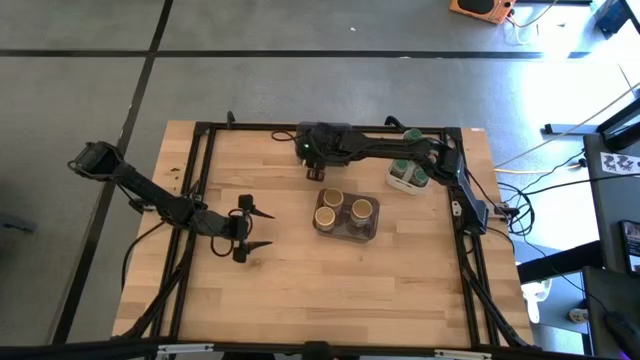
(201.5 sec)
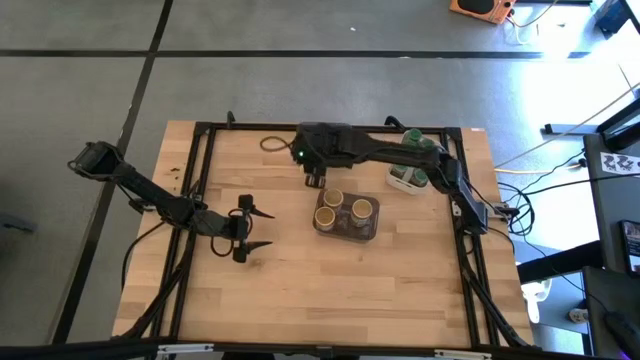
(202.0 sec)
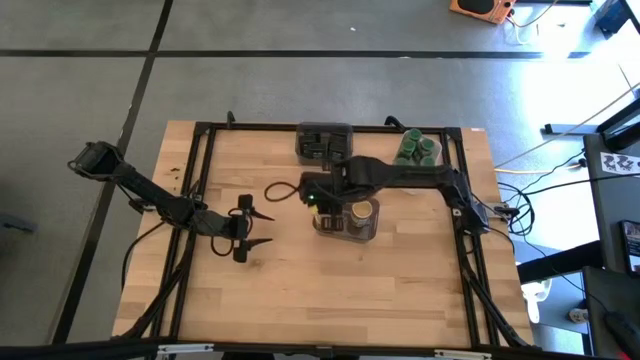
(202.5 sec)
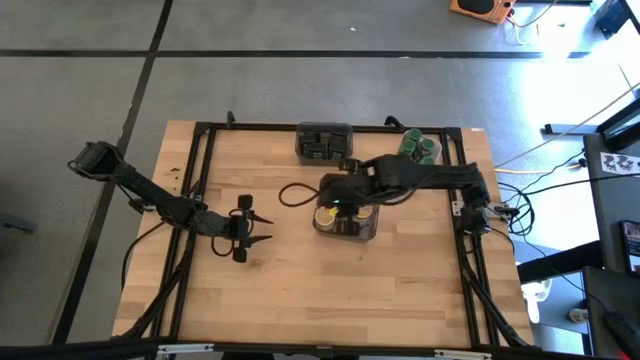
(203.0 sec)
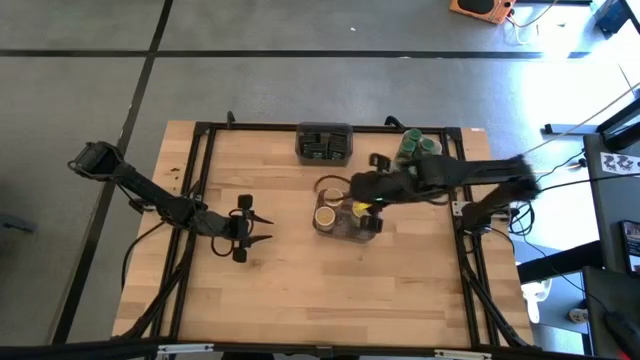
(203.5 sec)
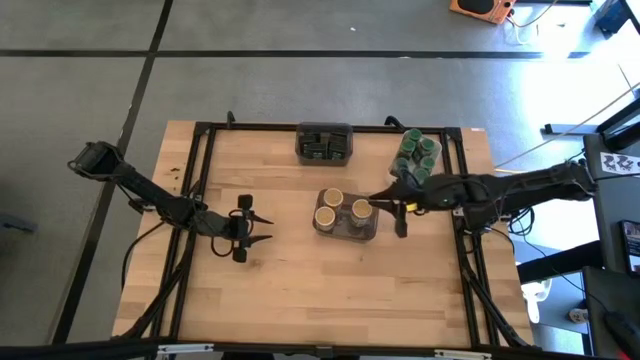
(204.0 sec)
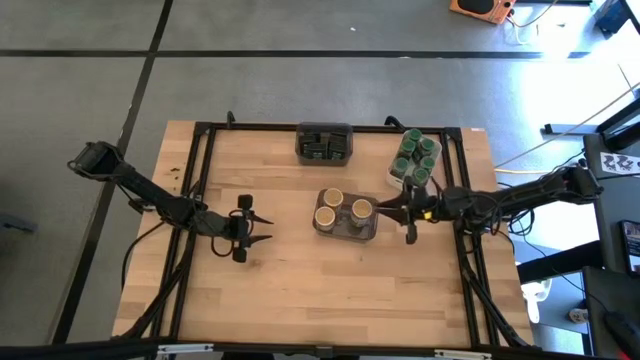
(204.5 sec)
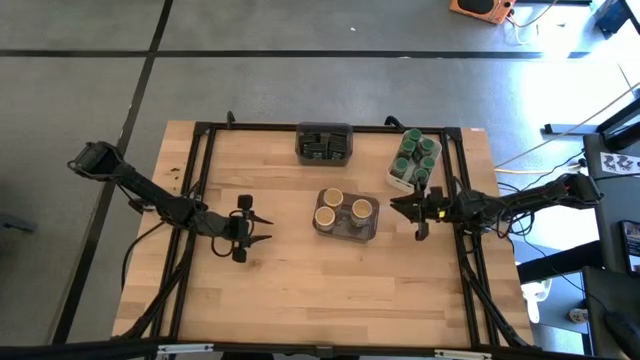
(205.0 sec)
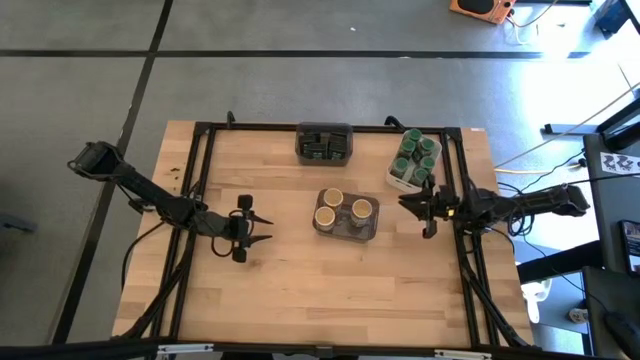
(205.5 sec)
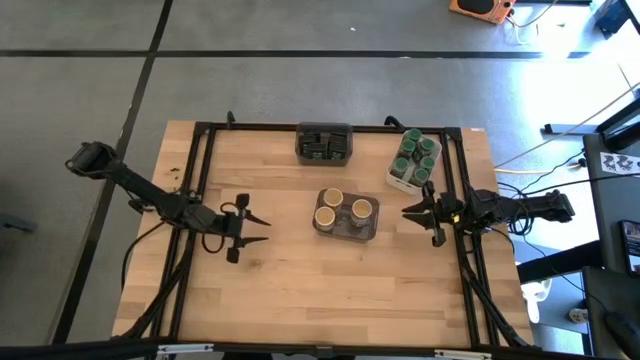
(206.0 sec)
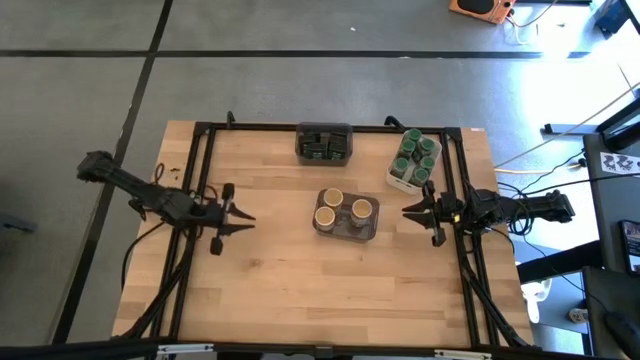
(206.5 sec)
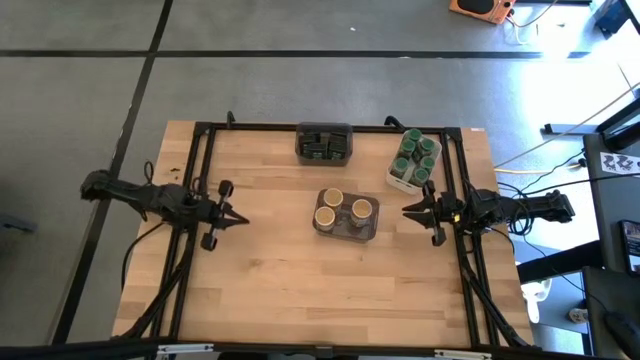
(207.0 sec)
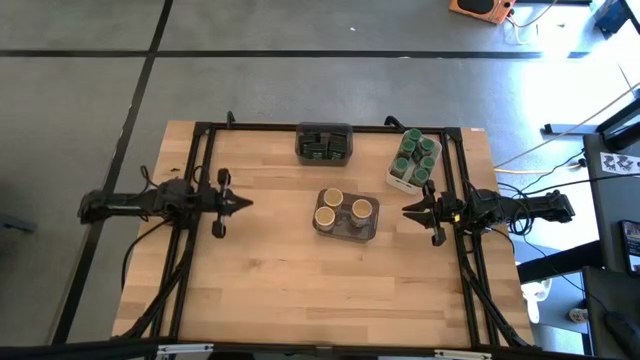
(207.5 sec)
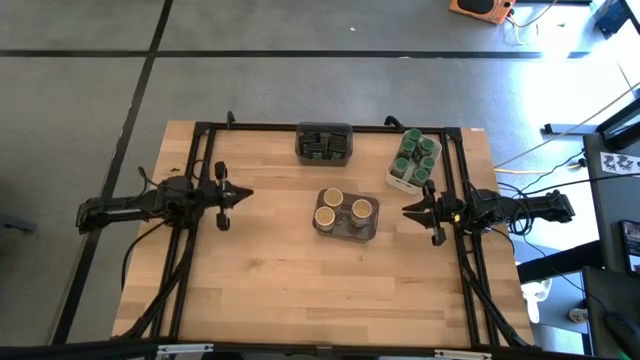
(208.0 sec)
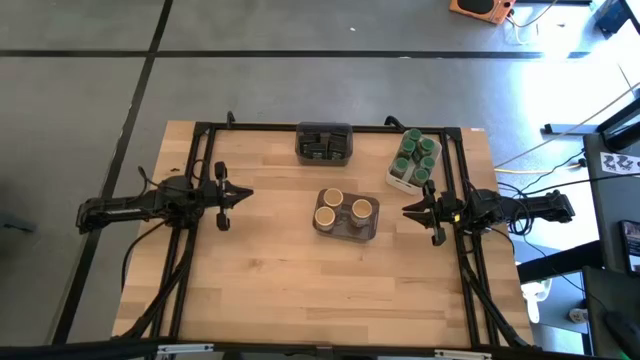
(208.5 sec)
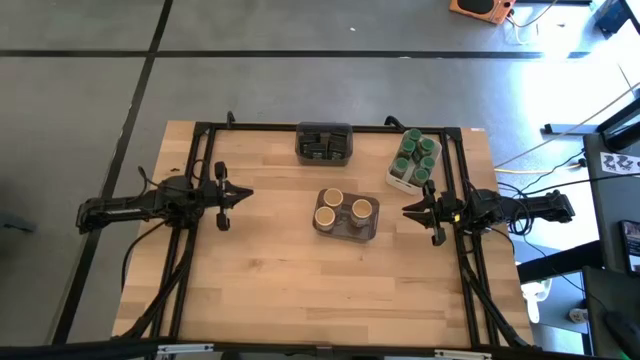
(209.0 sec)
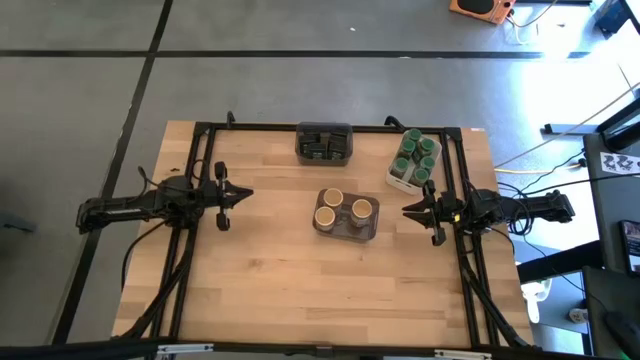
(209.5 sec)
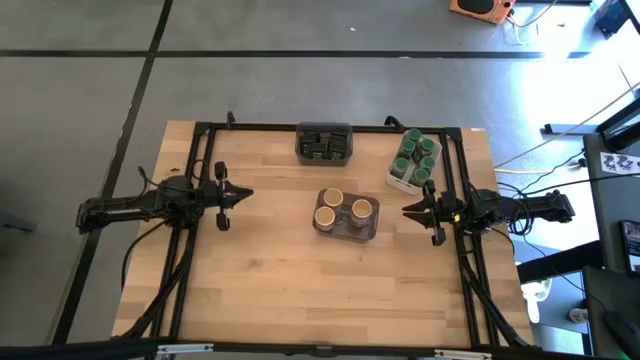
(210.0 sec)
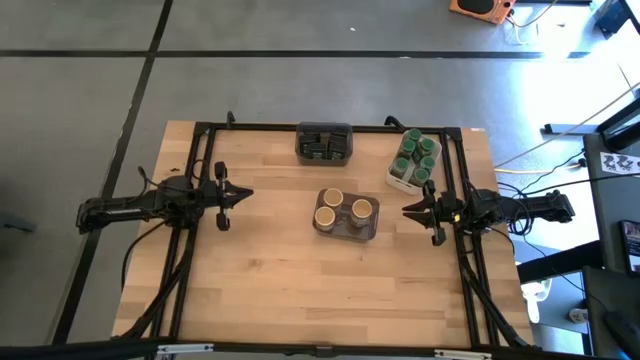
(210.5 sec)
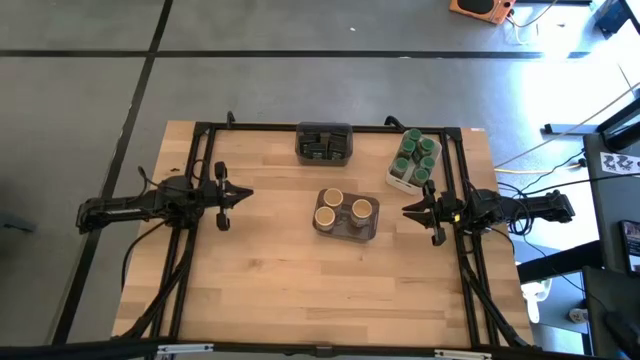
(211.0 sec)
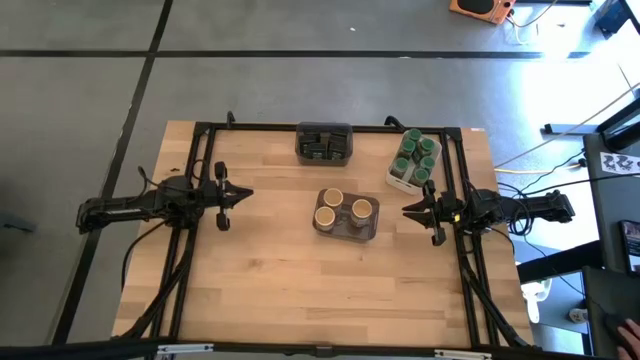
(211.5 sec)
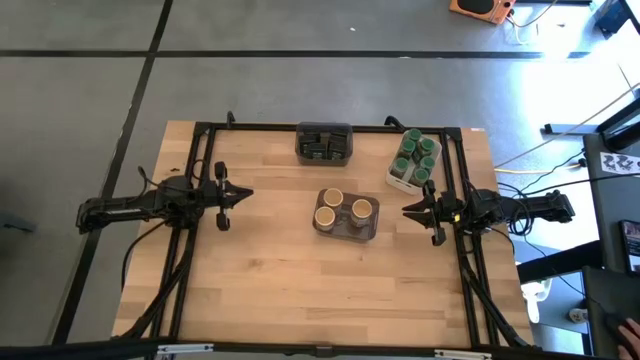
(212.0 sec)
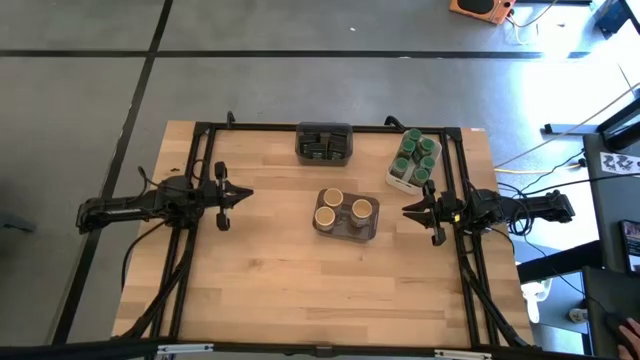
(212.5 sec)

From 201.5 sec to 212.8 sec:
Task: Sort spices by type
Return to Home Position

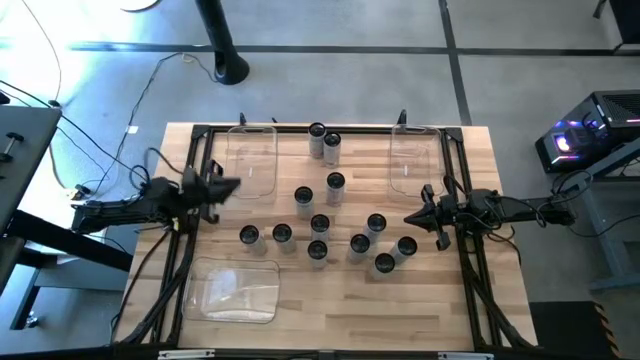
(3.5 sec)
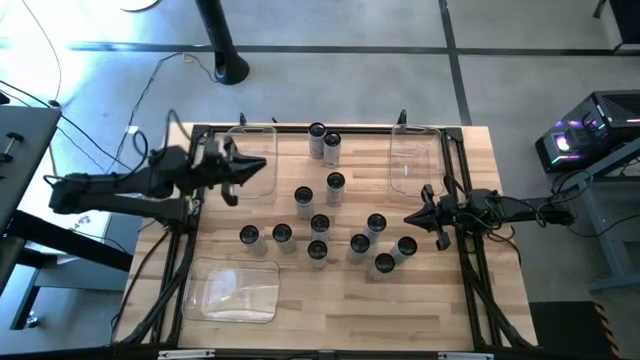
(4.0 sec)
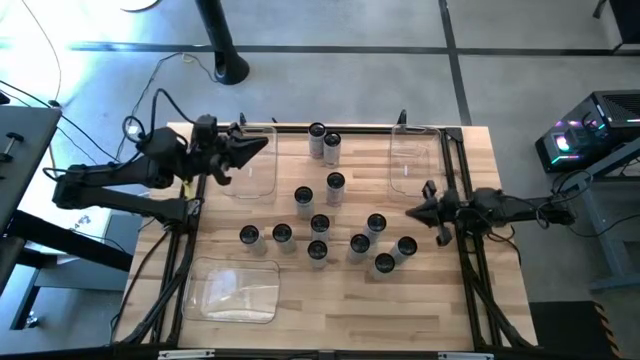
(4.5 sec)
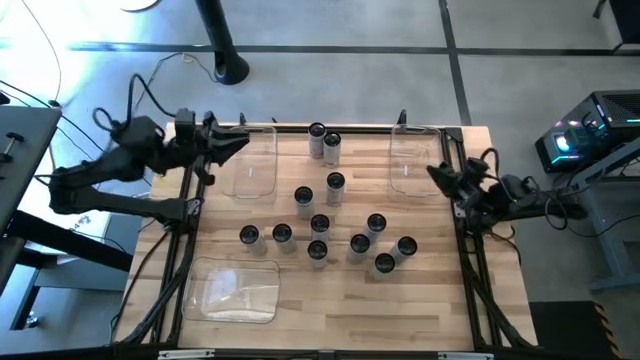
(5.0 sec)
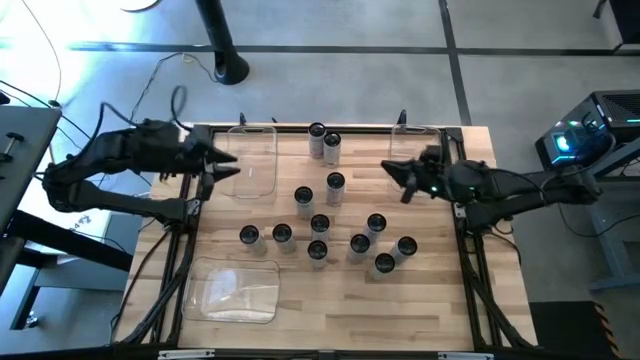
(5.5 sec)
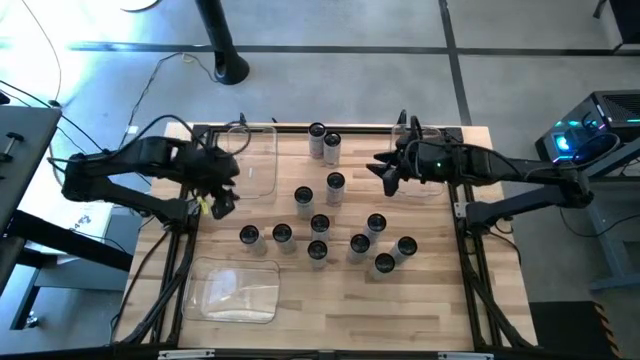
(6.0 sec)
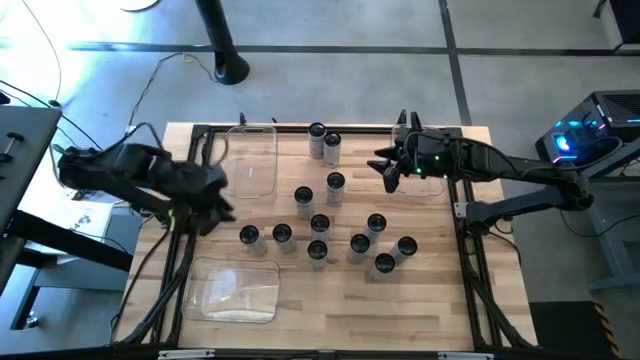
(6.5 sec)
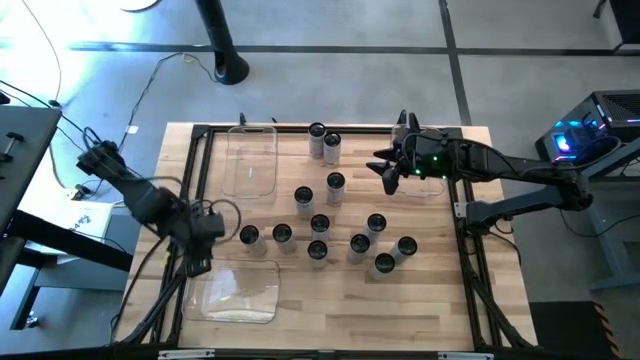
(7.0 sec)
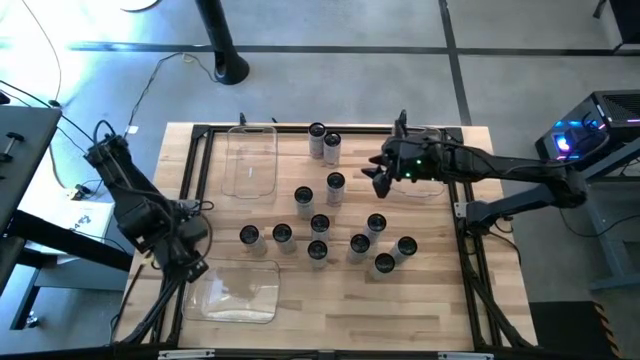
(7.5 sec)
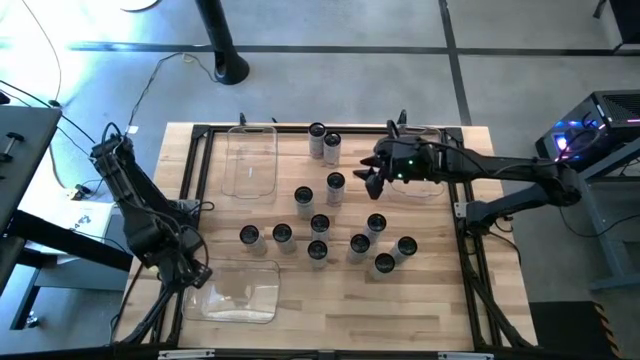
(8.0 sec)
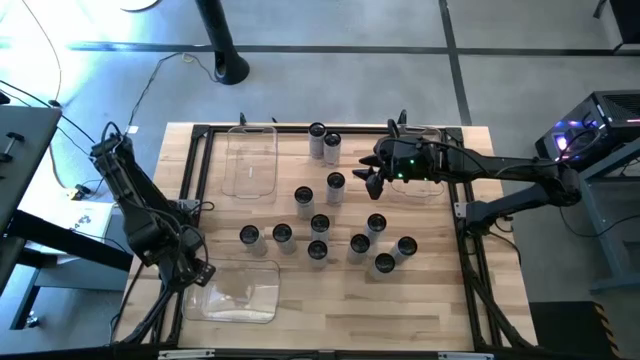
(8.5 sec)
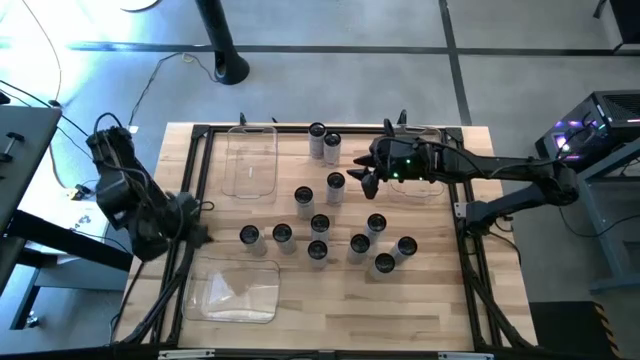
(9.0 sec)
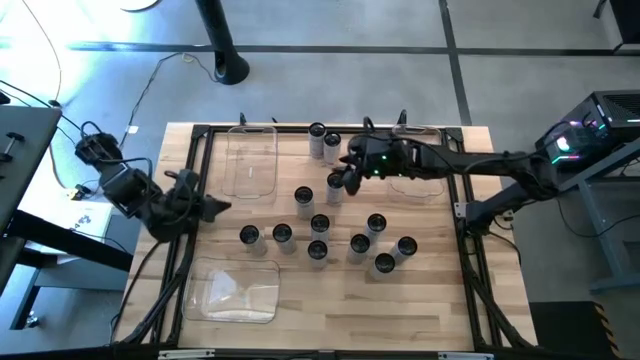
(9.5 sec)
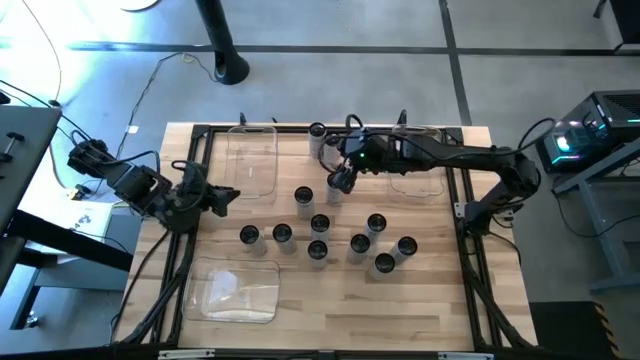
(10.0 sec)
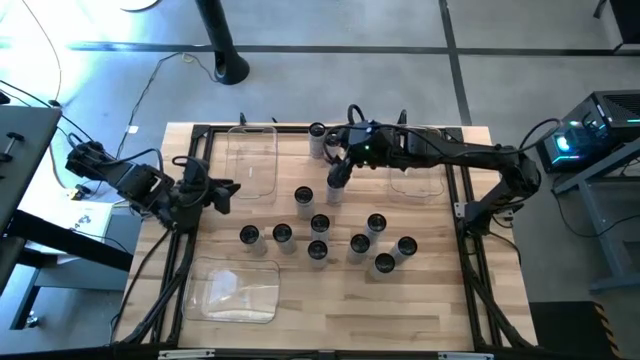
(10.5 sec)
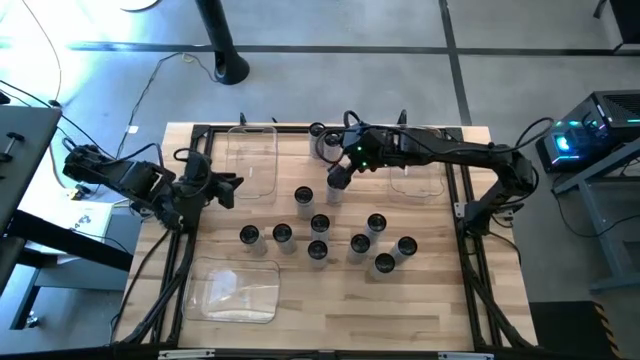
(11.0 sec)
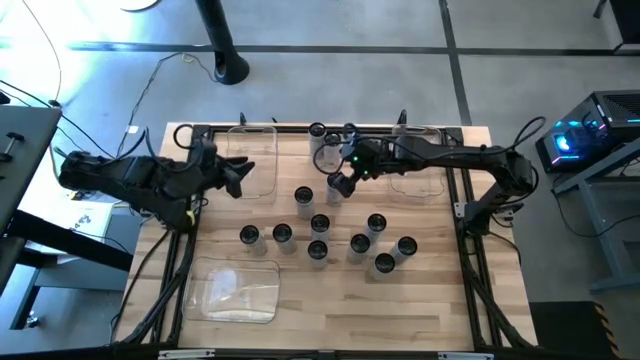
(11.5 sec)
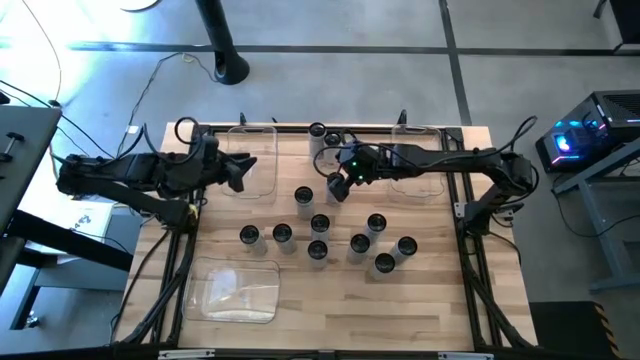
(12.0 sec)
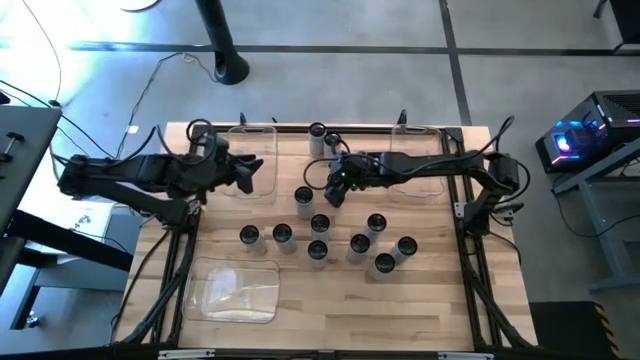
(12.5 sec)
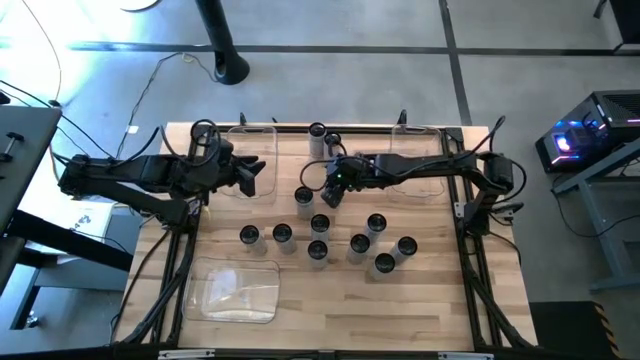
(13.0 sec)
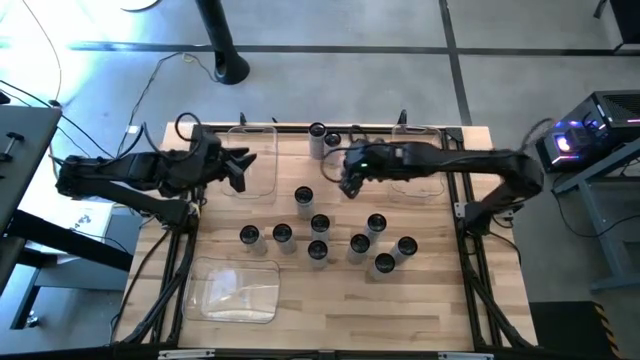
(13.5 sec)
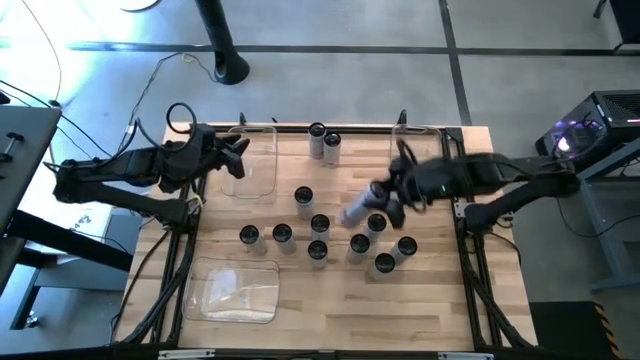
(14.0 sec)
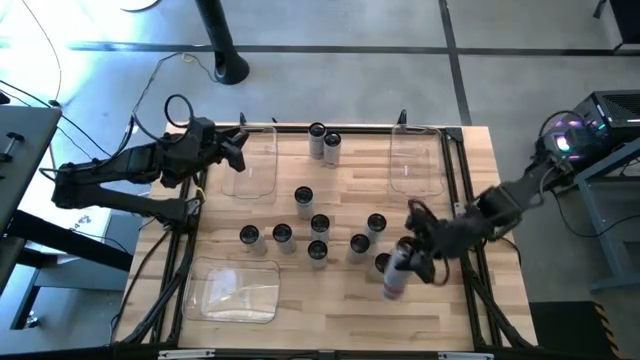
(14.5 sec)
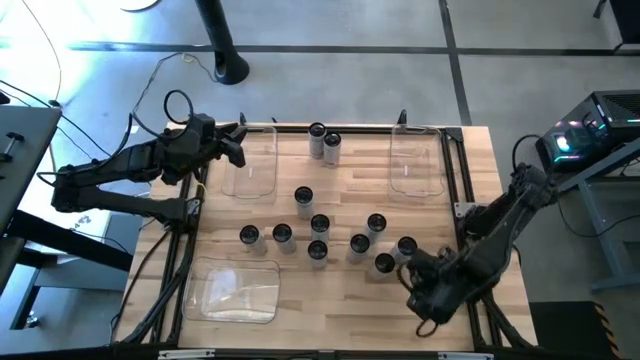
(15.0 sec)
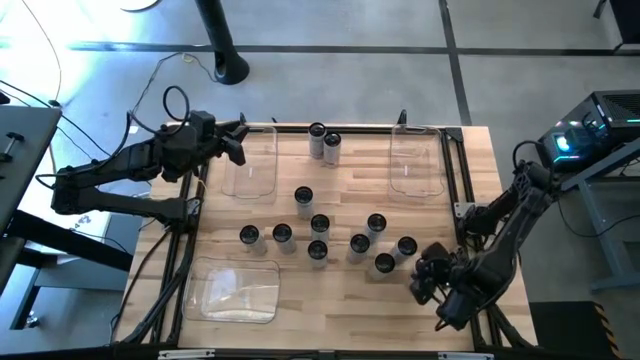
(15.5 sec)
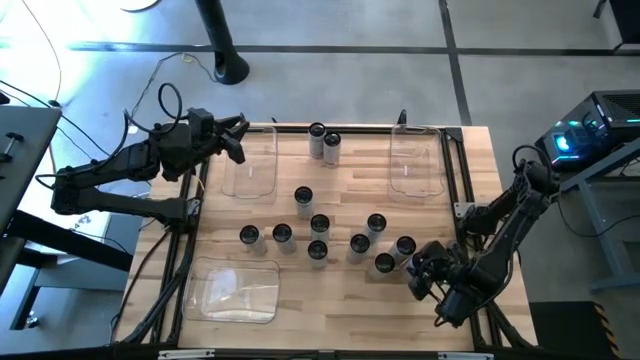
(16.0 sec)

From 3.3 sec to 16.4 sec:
Task: Sort soda cans
Move the white-pink soda can to the bottom right of the table
